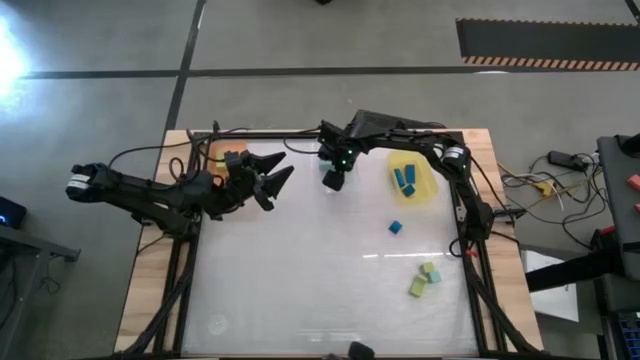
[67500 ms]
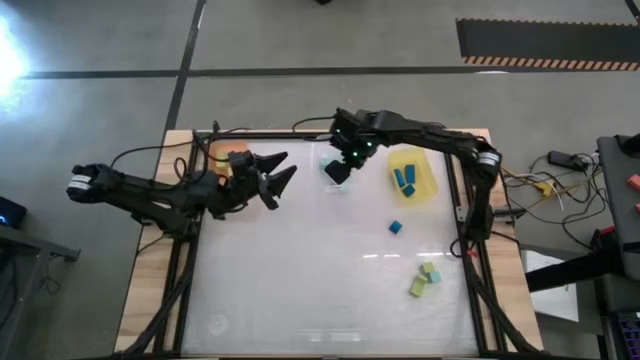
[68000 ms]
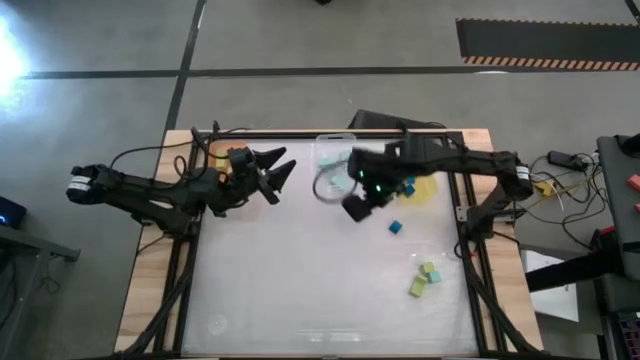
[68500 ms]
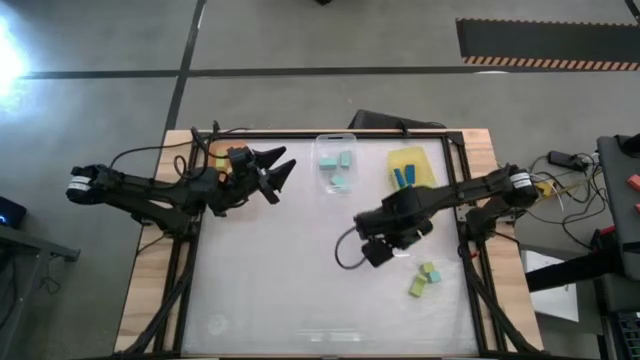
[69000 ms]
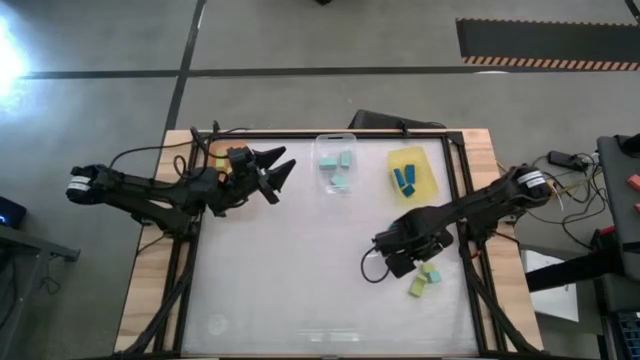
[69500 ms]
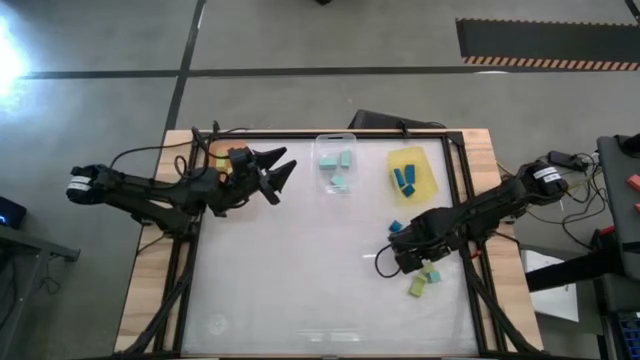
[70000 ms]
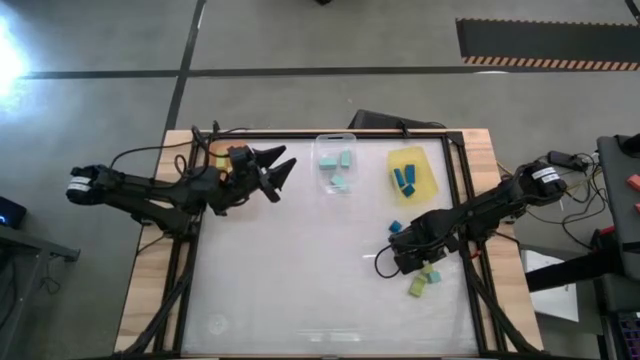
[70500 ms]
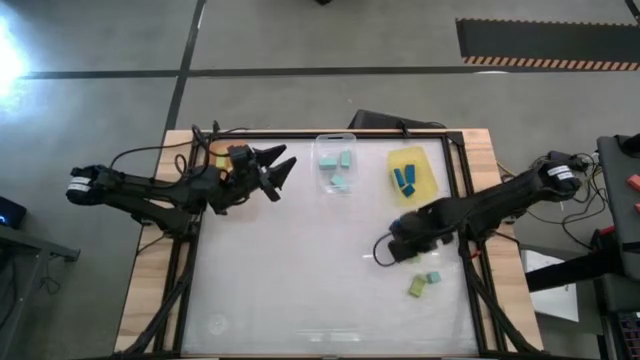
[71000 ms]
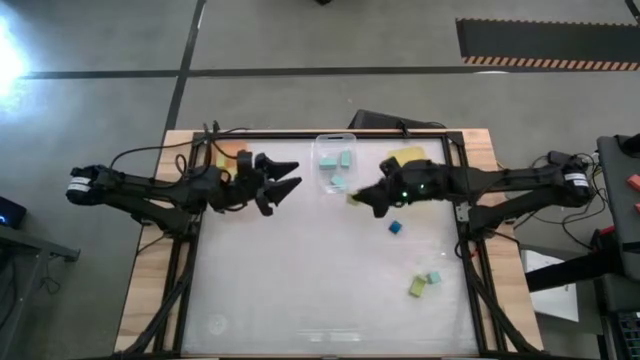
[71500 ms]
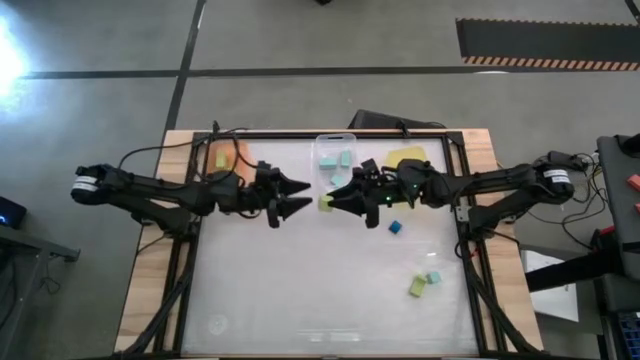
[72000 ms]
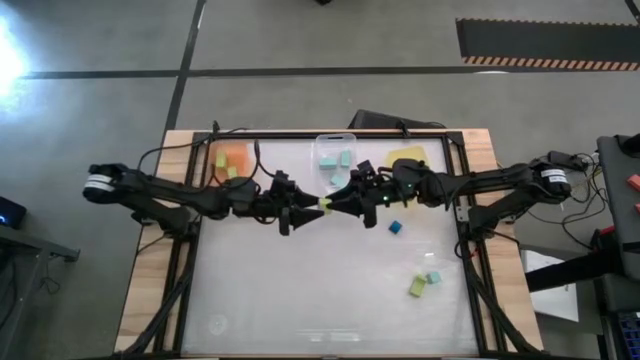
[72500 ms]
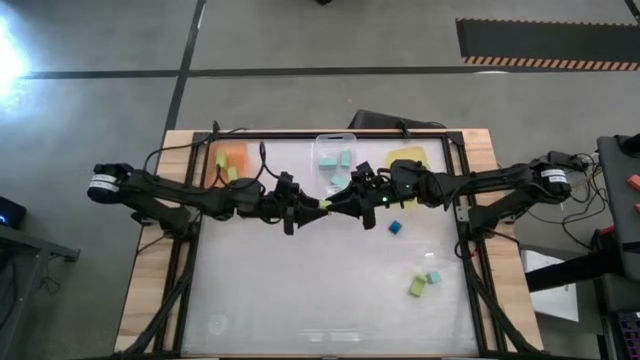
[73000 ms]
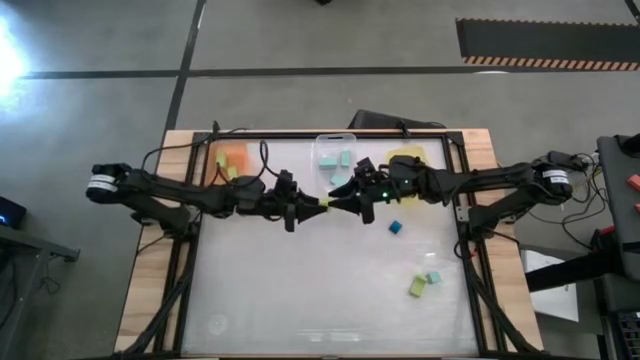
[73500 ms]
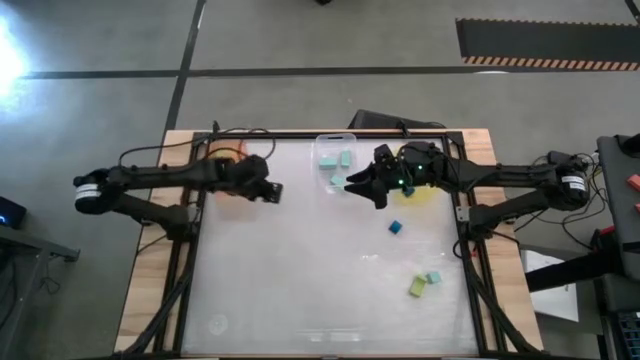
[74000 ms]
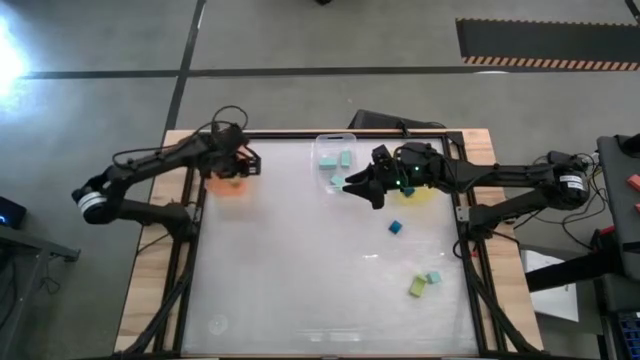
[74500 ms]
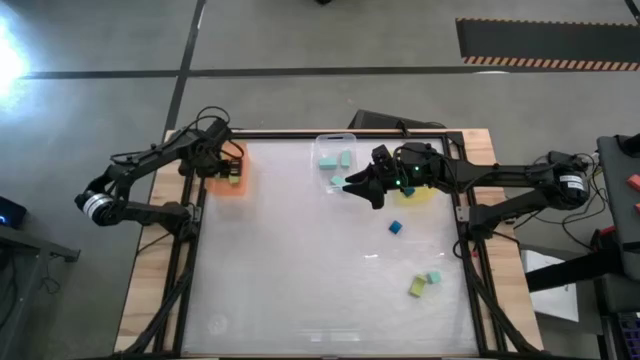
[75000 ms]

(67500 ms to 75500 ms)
Task: Sort & place blocks by color
Put the light green block into the orange bin

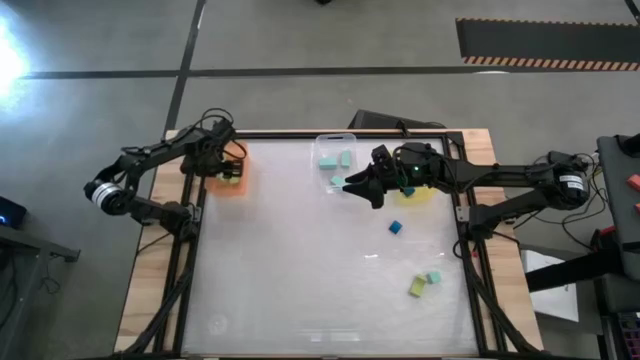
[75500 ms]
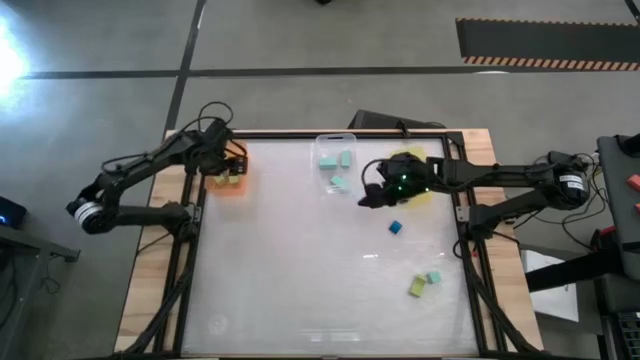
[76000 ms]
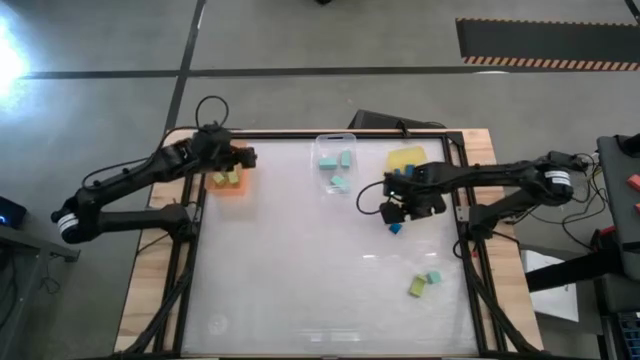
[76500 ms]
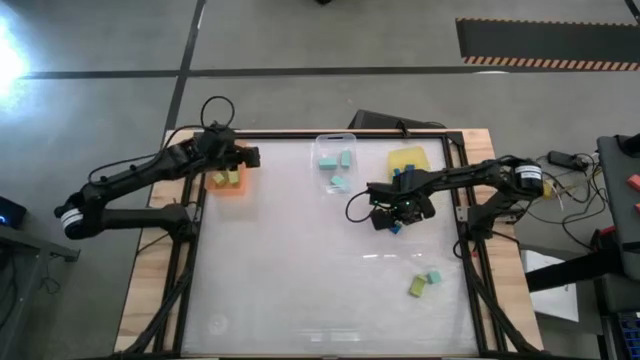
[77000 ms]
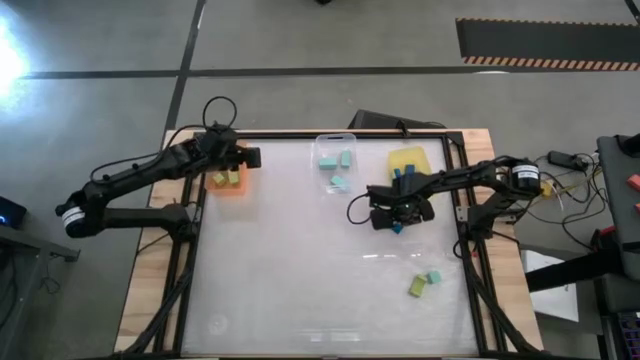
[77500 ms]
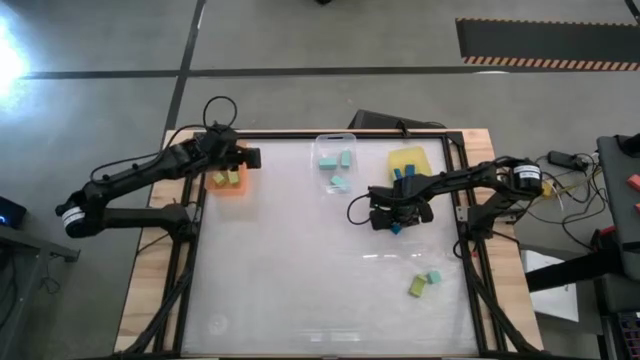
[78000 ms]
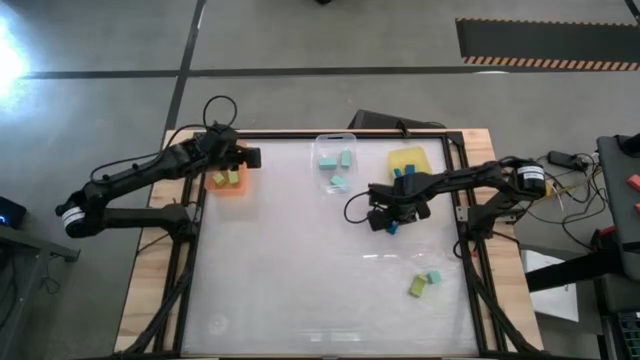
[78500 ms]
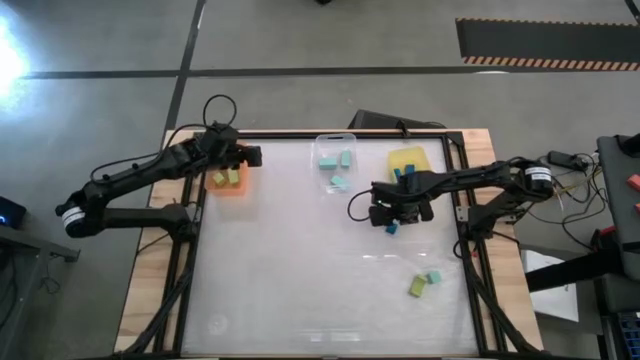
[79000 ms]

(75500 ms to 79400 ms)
Put the blue block into the yellow bin

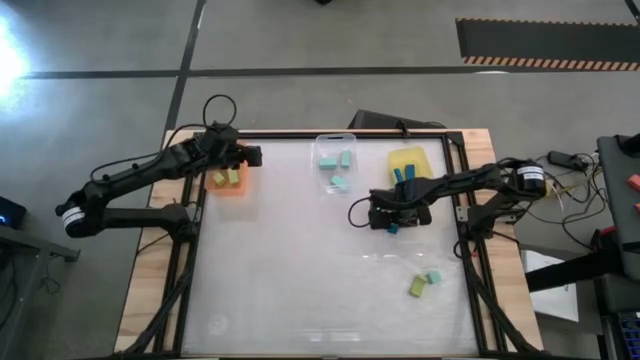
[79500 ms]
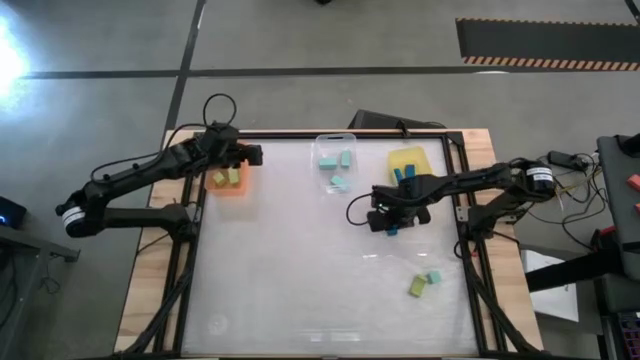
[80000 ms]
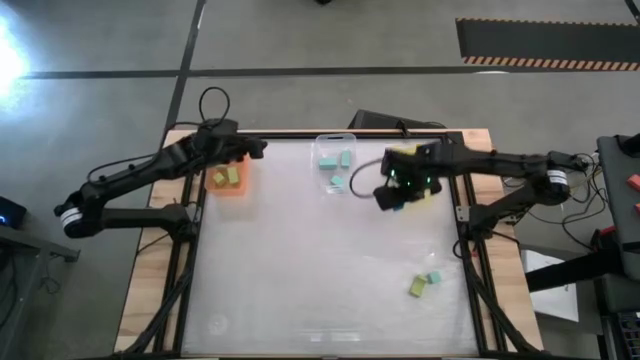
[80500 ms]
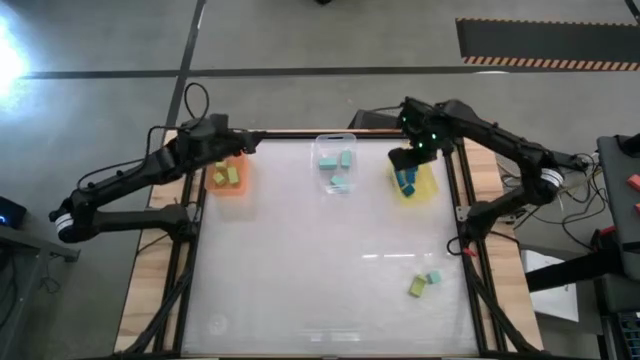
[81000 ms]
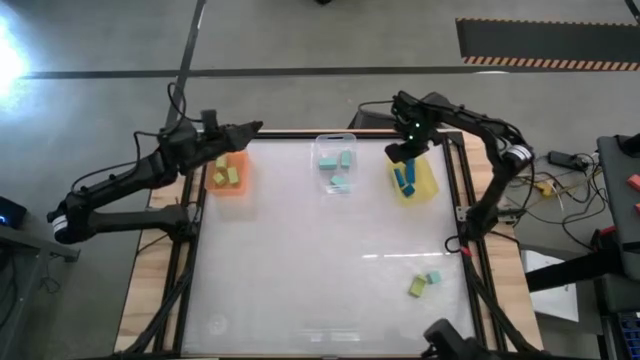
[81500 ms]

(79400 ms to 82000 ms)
Put the blue block into the yellow bin

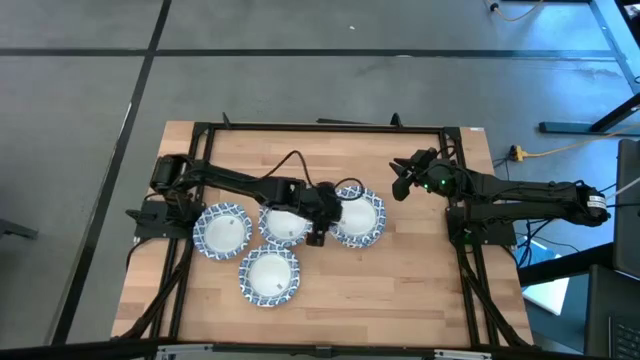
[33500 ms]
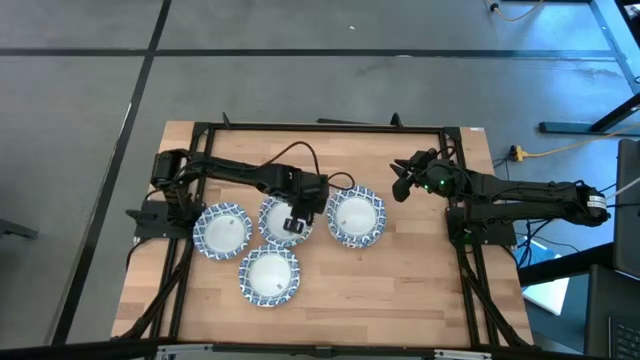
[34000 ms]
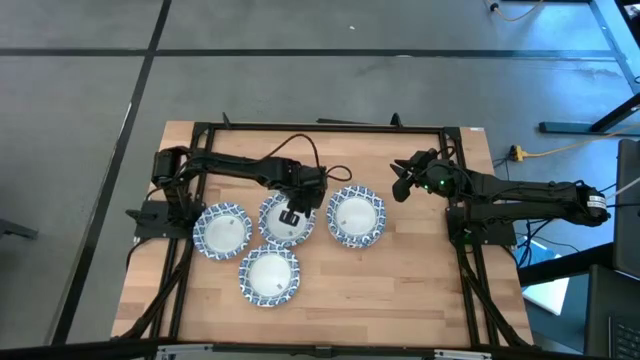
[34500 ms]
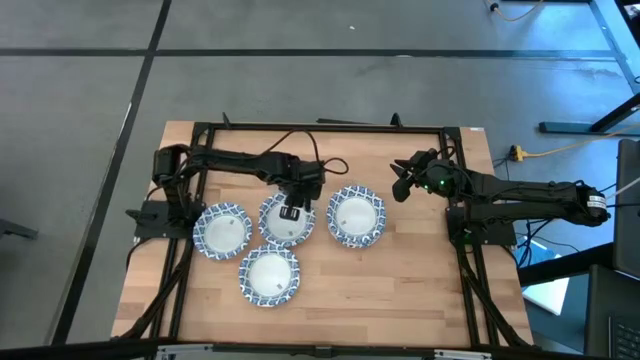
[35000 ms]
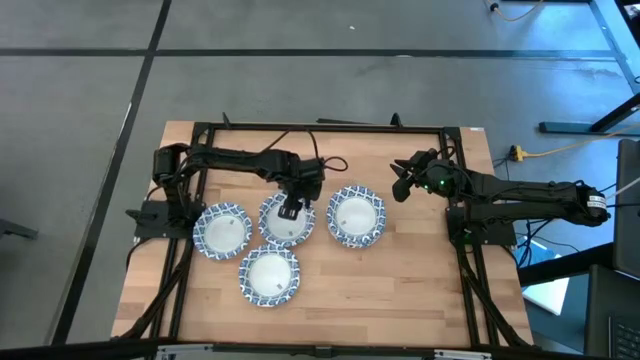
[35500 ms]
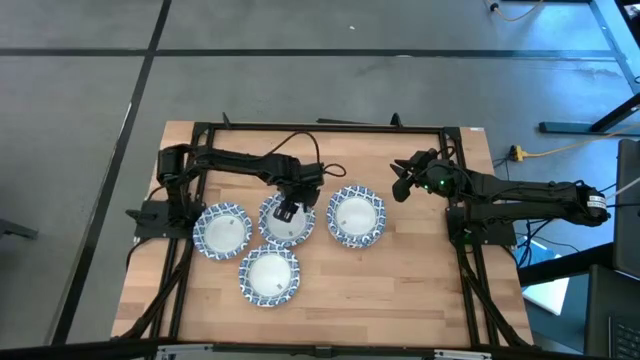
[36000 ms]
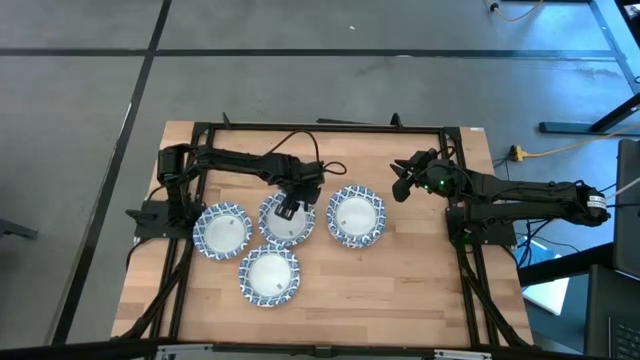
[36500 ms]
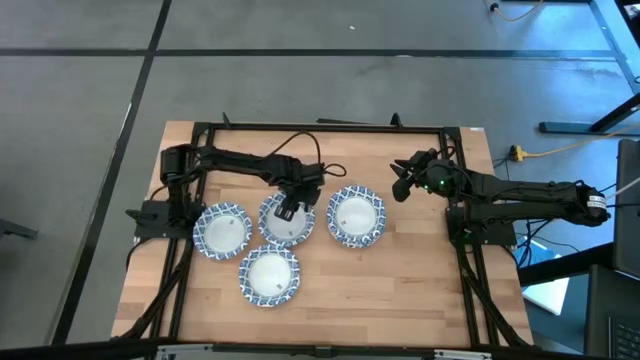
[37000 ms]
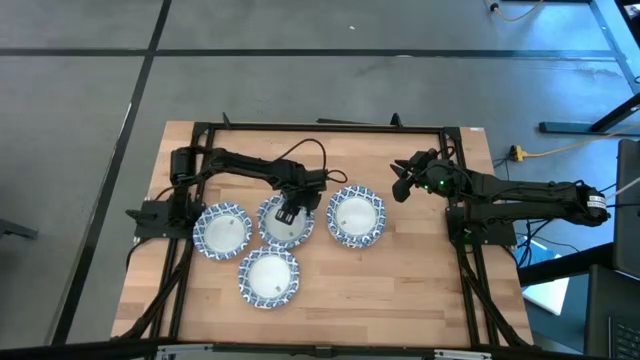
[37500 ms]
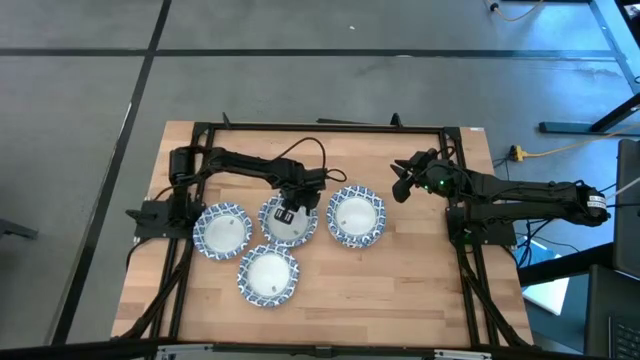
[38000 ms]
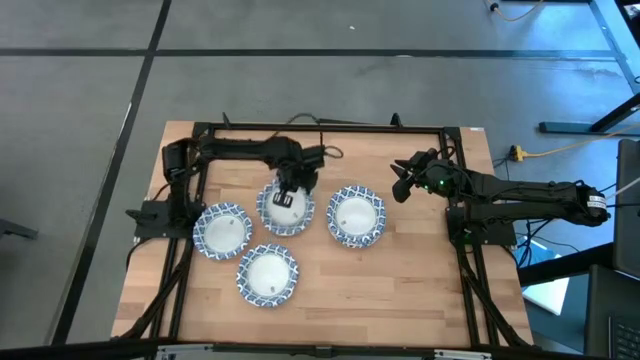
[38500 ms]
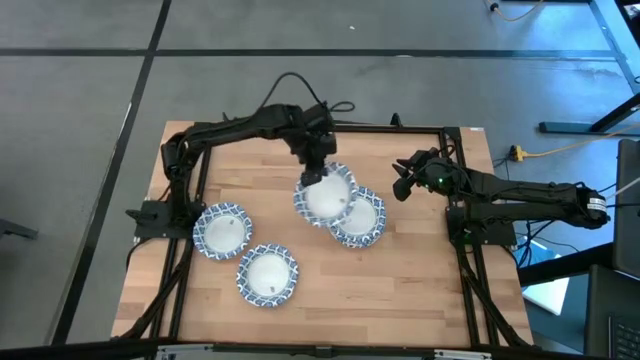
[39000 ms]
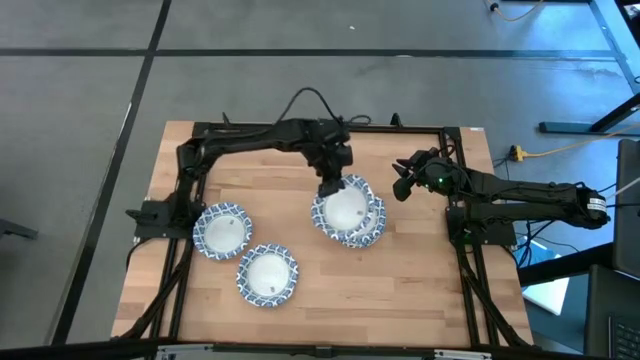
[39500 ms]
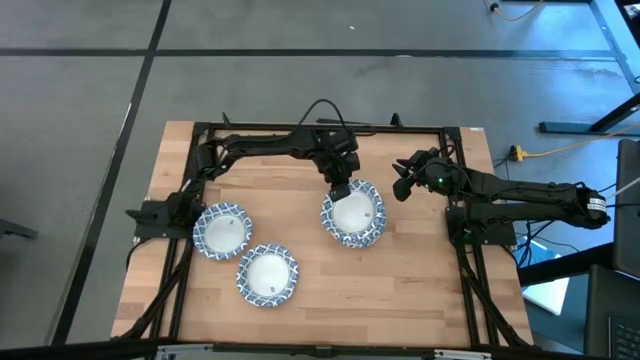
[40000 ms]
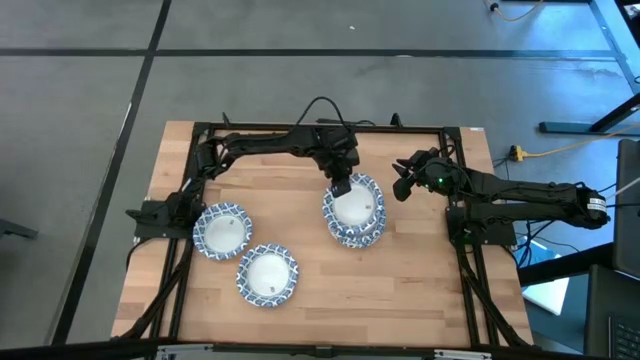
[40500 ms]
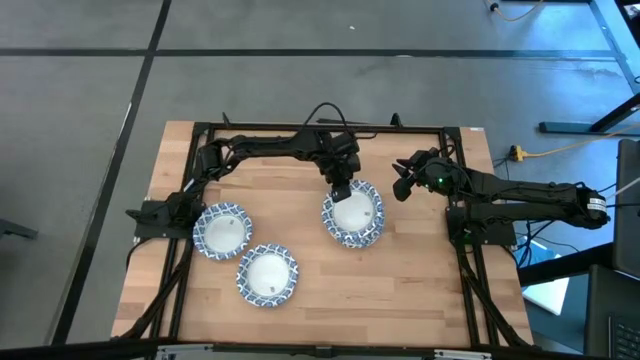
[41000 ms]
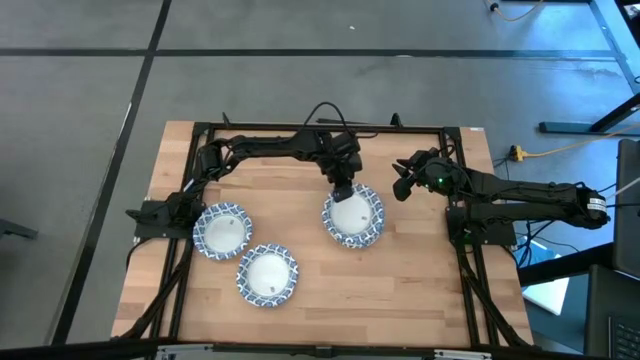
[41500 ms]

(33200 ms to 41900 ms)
Task: Nest bowls inside each other
Stack the white patterned bowls on top of the other white patterned bowls
